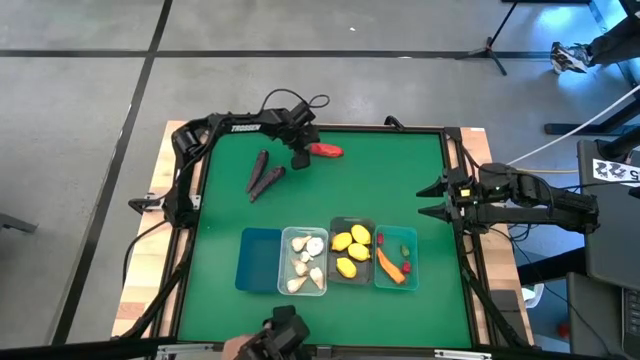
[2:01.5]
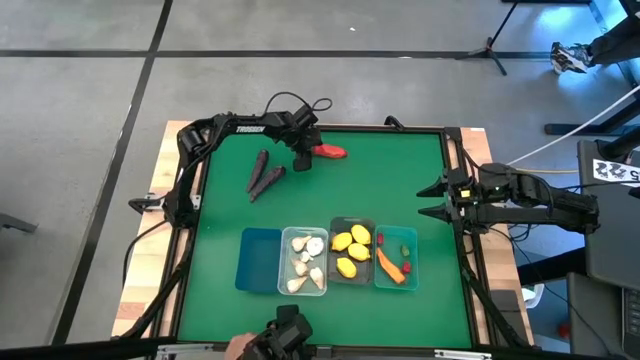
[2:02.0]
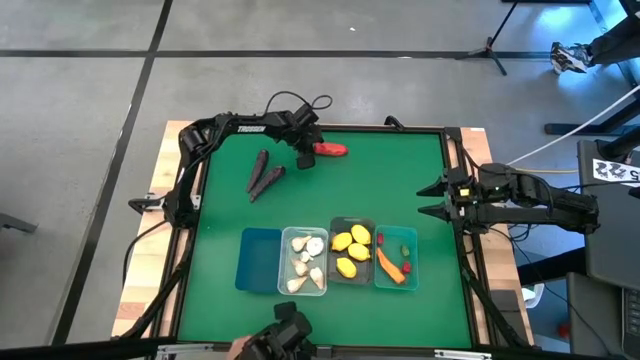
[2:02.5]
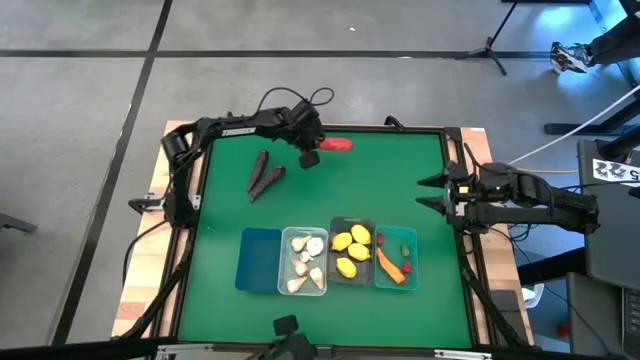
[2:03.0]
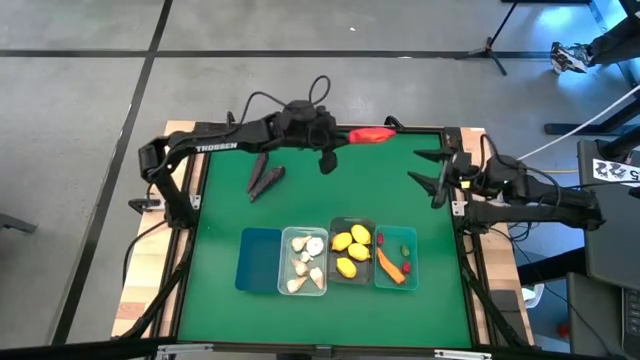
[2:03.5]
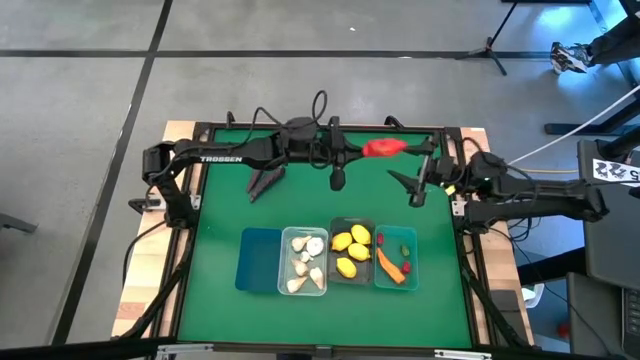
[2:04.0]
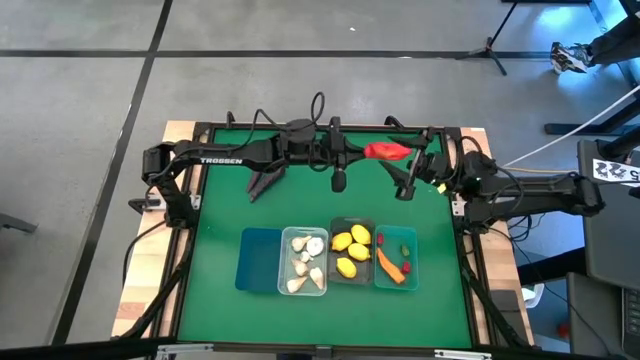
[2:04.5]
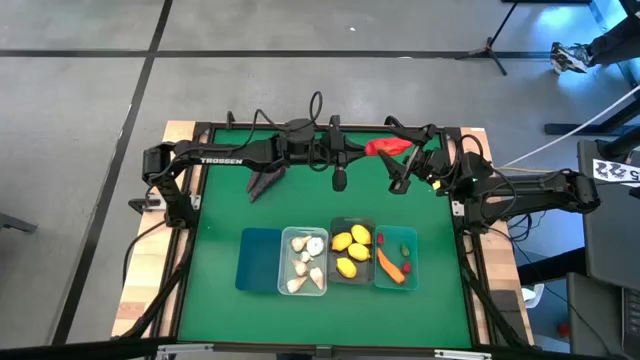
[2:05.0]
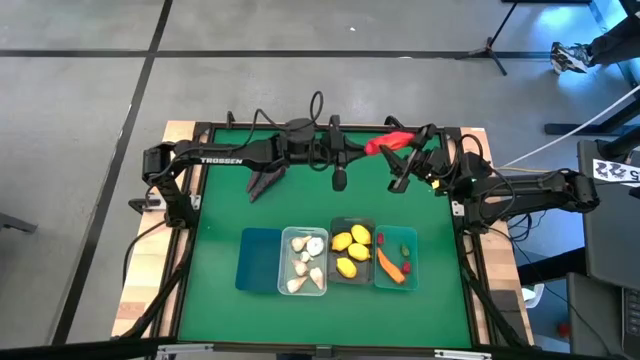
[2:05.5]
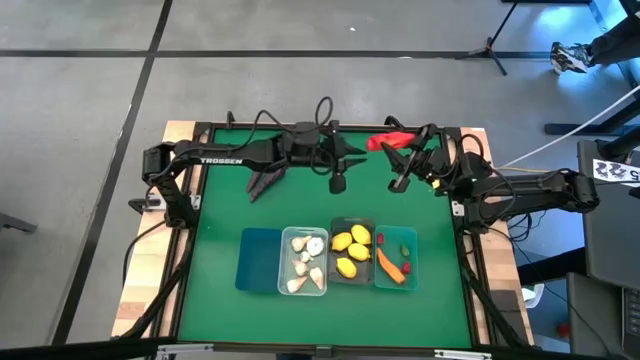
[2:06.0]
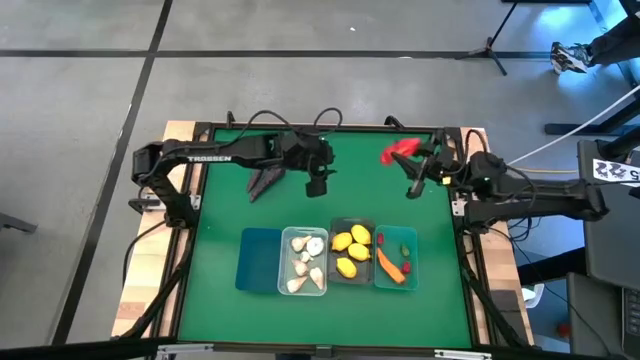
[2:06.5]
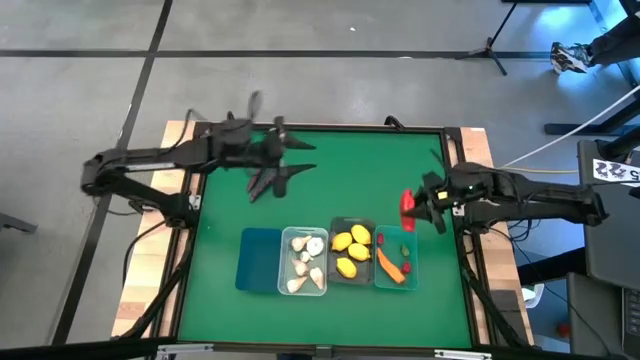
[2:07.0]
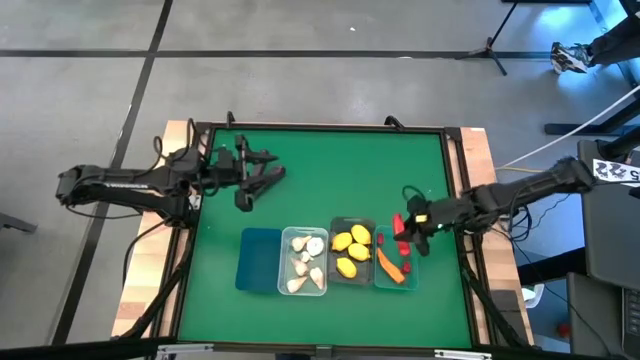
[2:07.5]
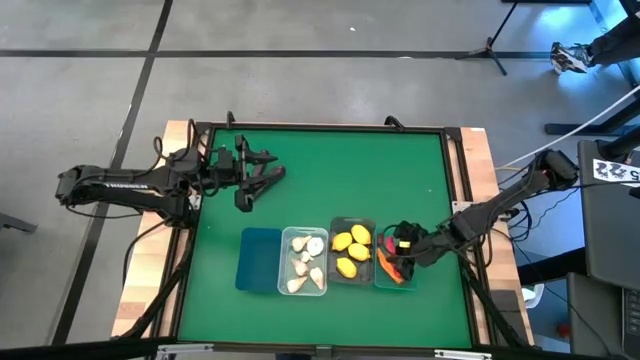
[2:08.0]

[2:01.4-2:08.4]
Task: Sort produce into baskets
Put the red chili pepper into the light blue bin

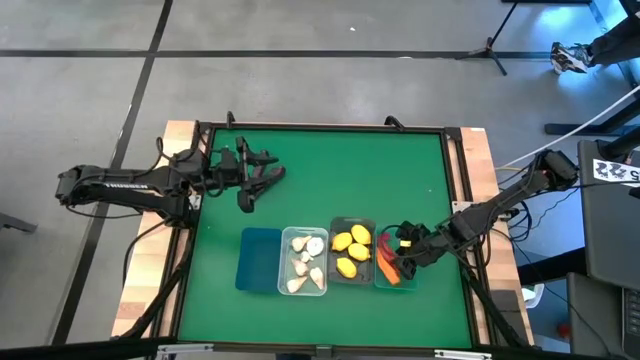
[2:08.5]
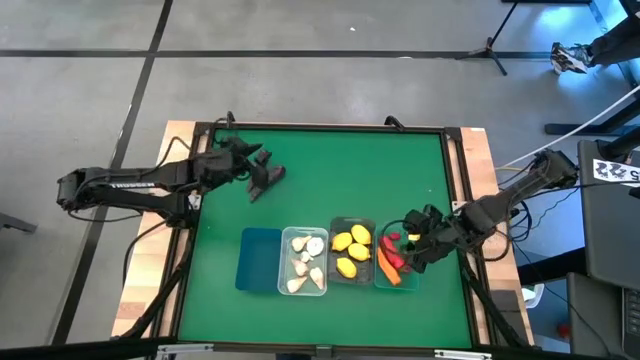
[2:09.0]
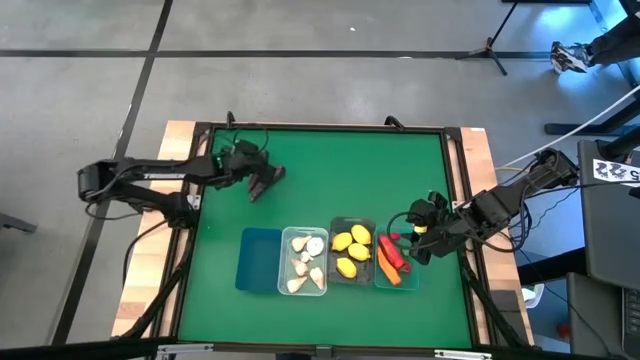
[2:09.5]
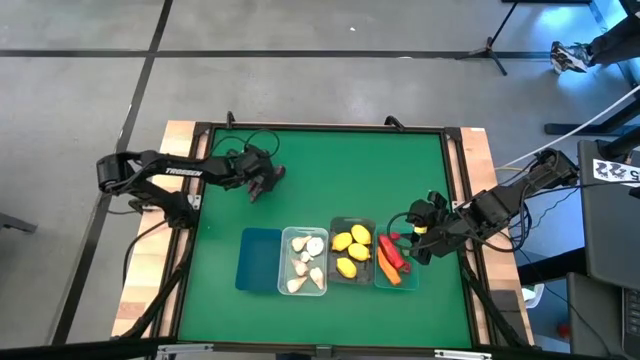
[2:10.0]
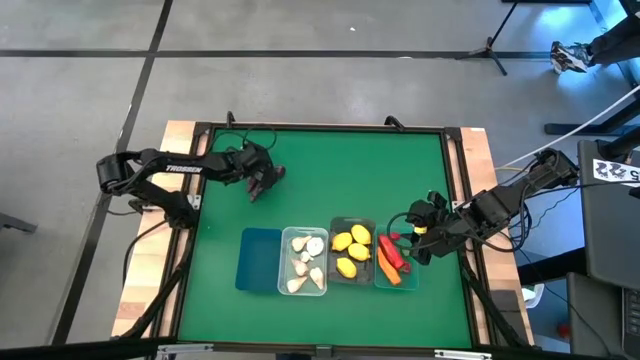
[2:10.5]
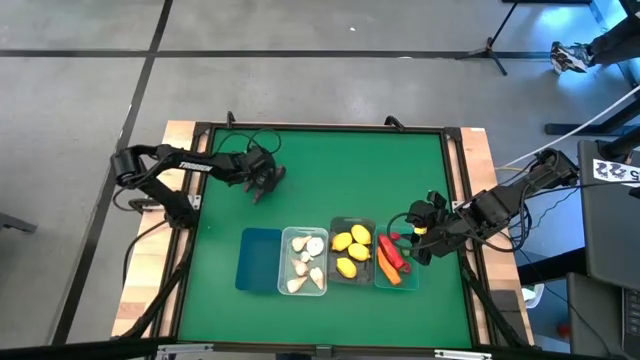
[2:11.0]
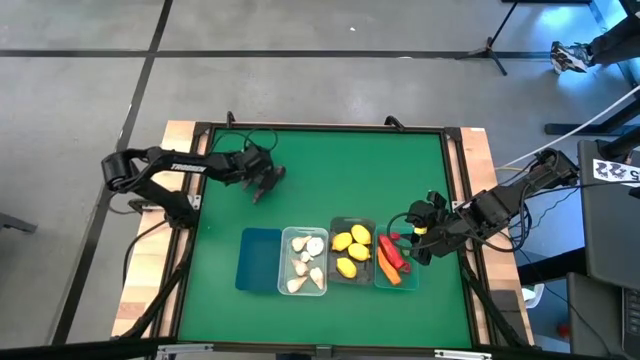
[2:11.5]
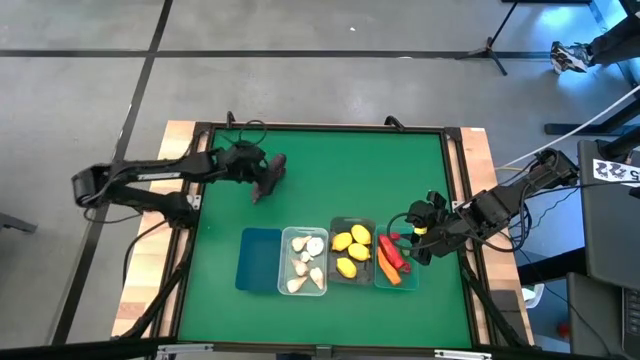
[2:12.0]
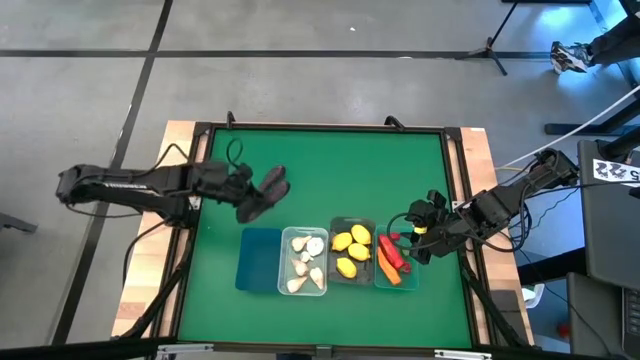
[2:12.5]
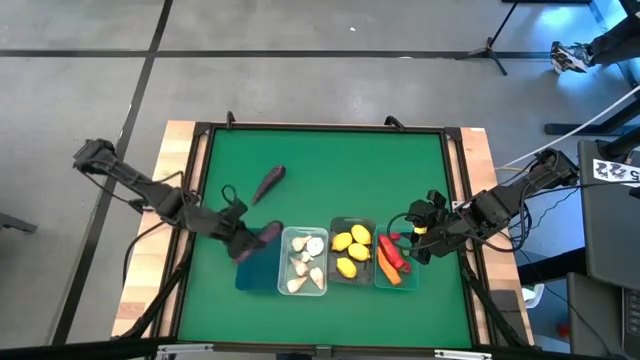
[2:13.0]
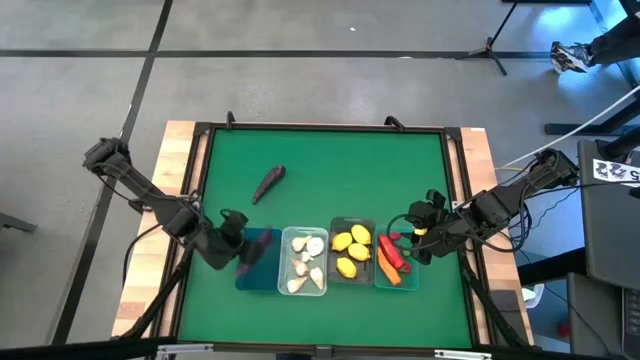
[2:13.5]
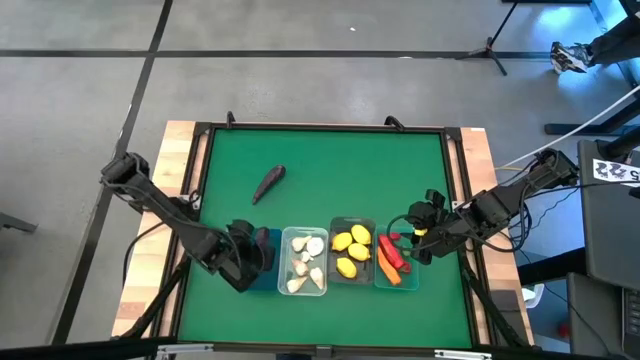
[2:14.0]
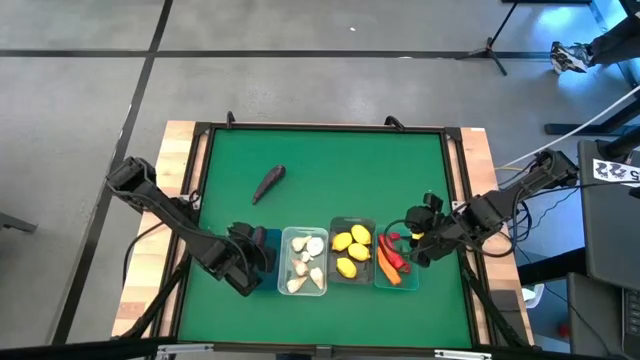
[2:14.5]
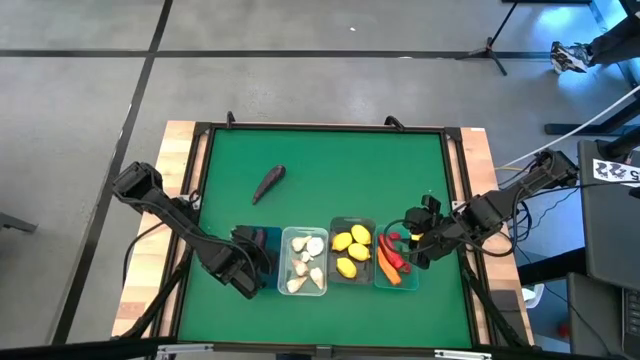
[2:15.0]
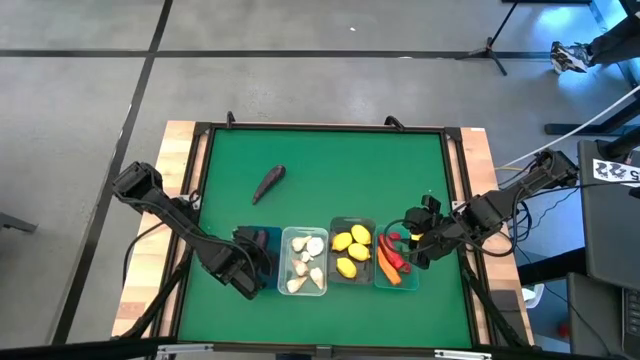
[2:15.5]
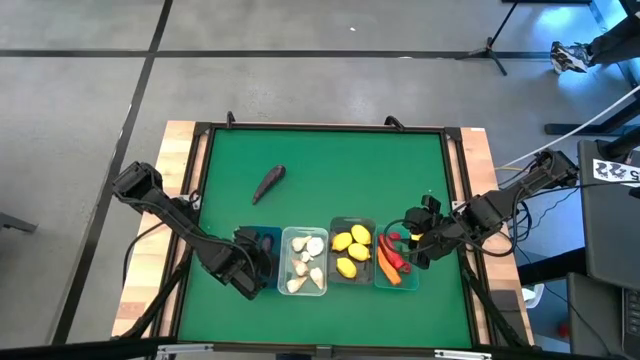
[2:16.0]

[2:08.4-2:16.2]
Put the eggplant into the dark blue bin

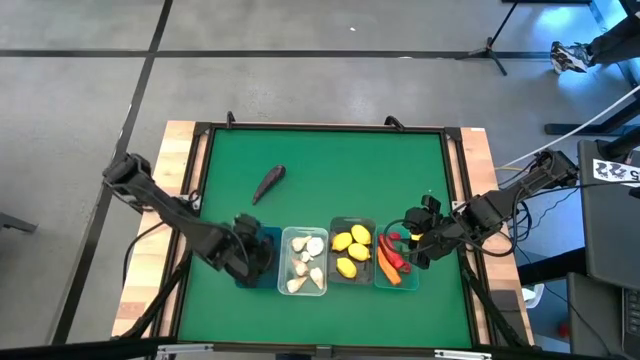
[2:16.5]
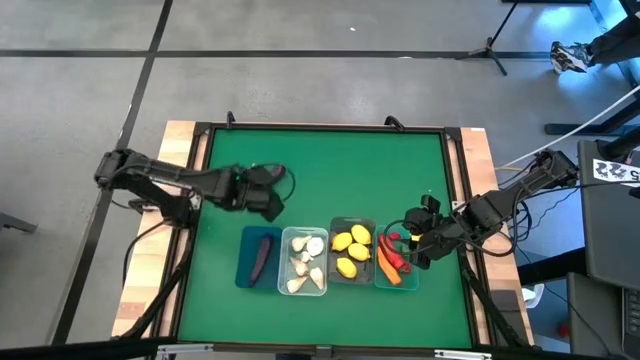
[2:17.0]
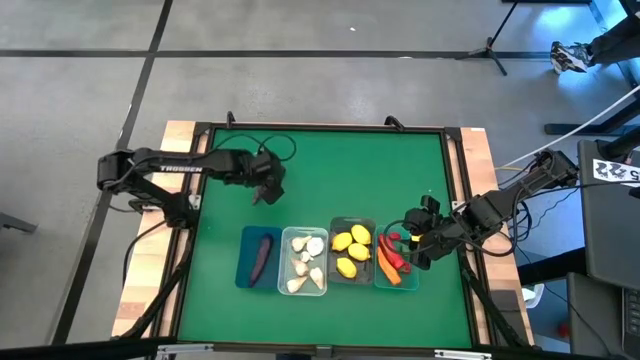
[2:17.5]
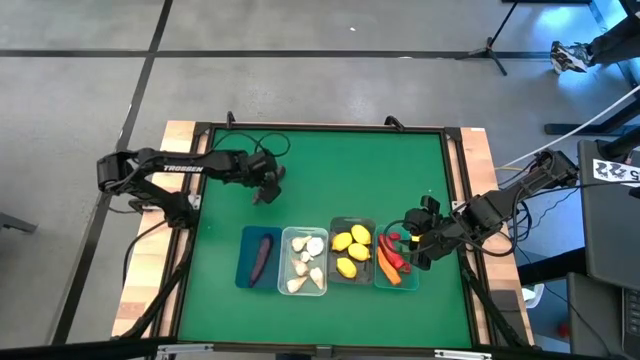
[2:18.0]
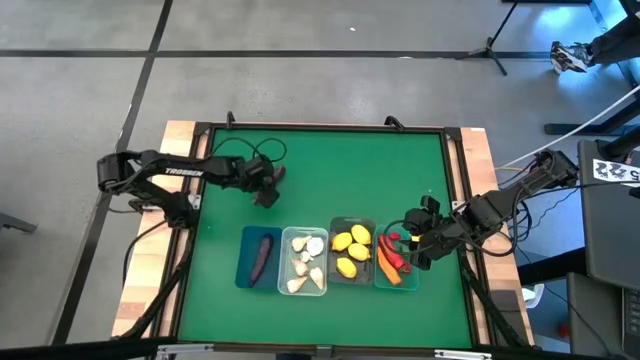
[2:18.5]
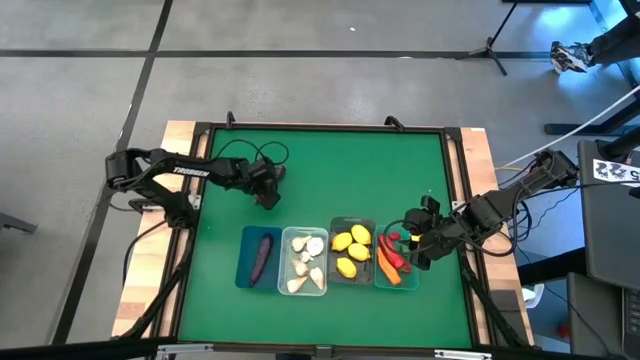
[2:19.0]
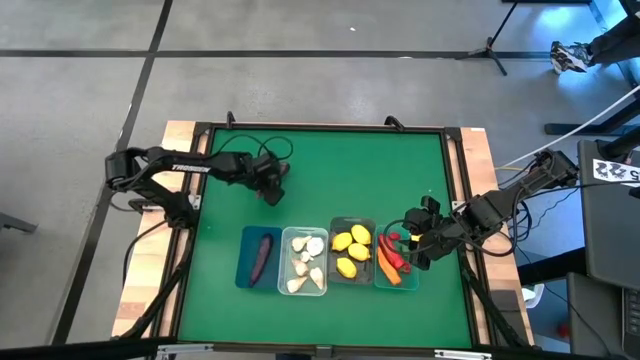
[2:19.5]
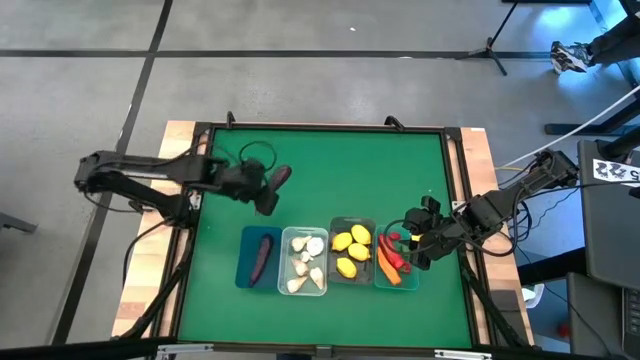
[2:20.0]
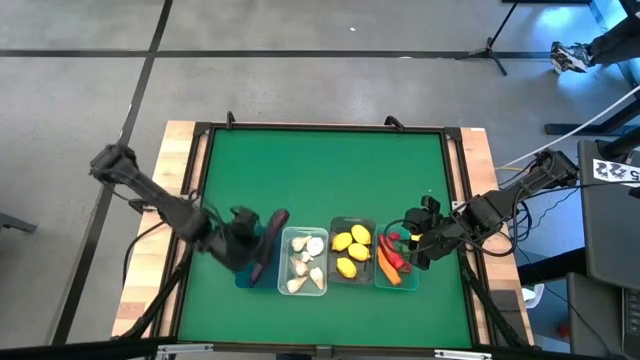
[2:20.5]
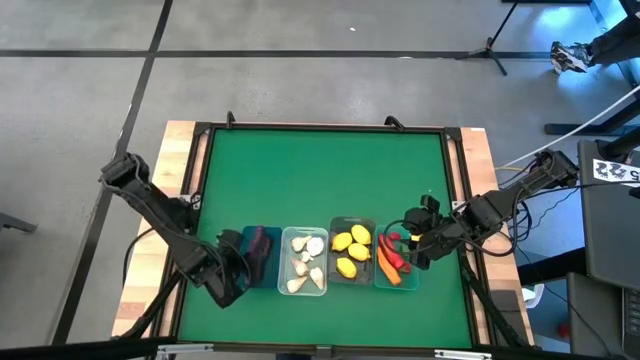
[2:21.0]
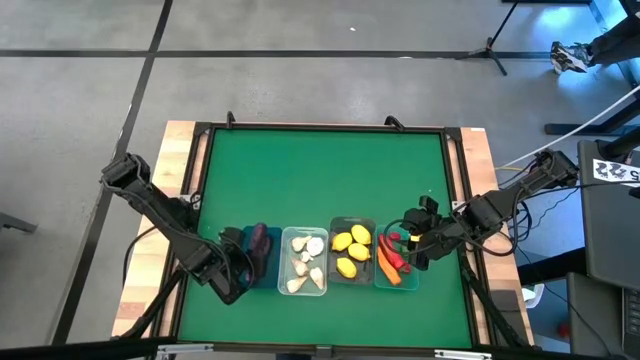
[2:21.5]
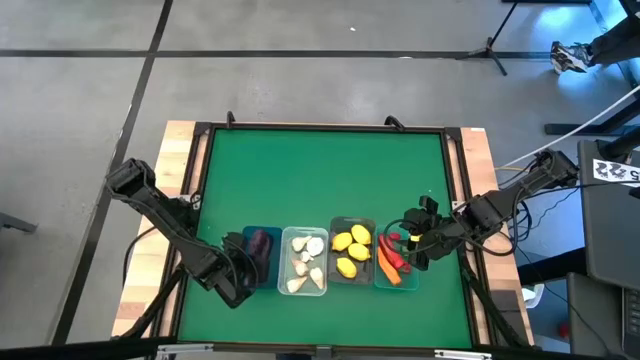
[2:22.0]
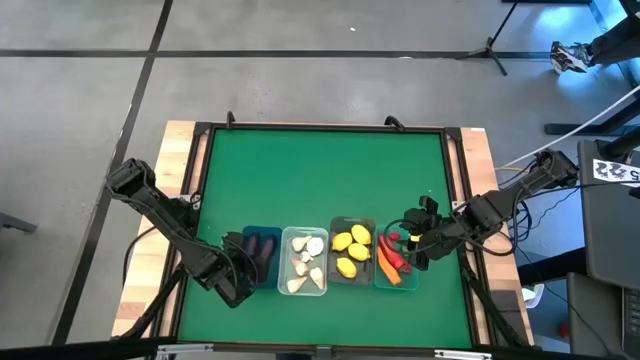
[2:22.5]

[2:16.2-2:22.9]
Put the eggplant into the dark blue bin
